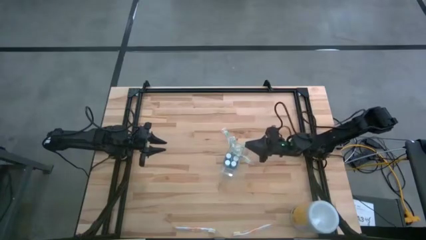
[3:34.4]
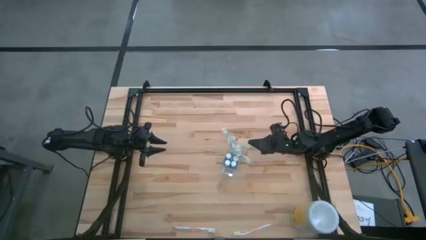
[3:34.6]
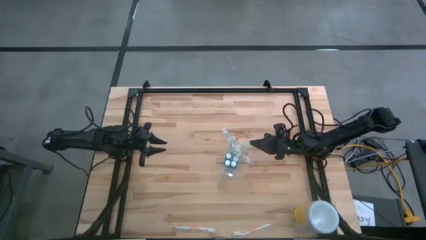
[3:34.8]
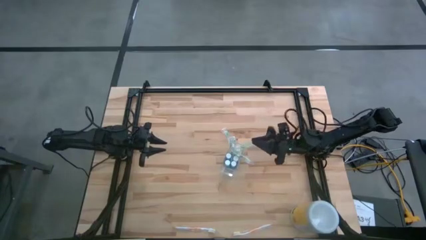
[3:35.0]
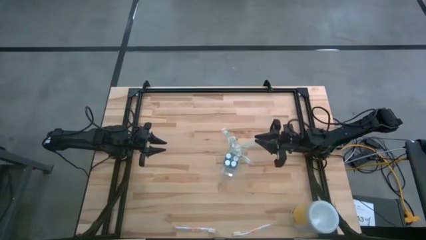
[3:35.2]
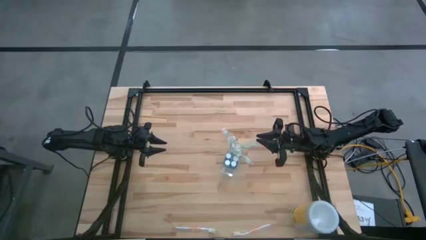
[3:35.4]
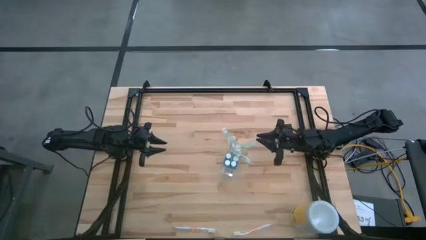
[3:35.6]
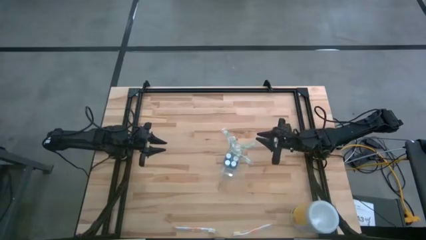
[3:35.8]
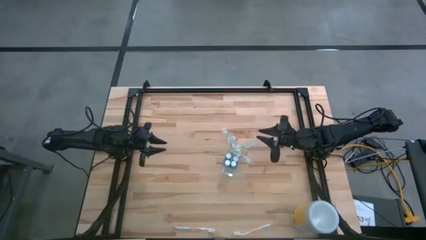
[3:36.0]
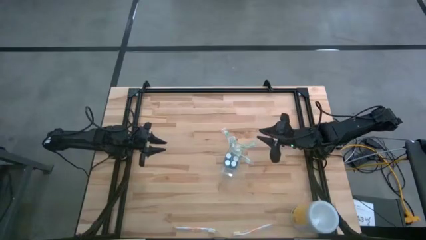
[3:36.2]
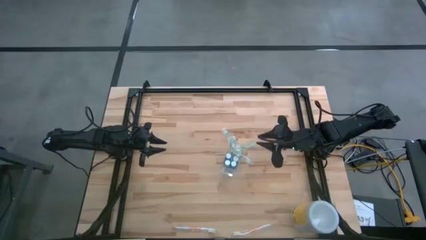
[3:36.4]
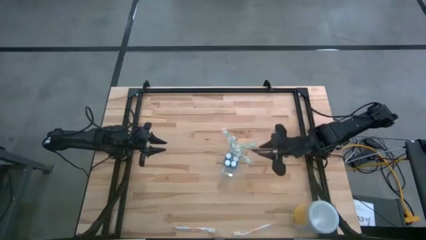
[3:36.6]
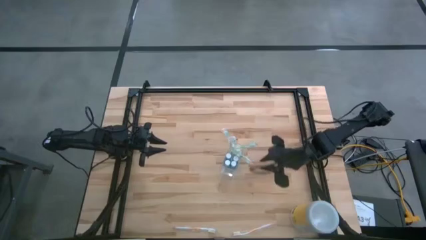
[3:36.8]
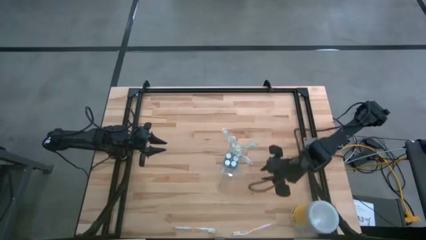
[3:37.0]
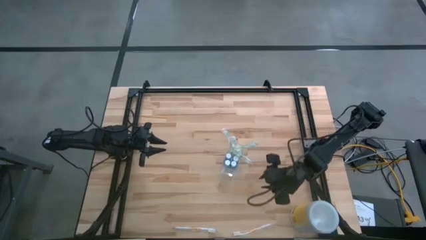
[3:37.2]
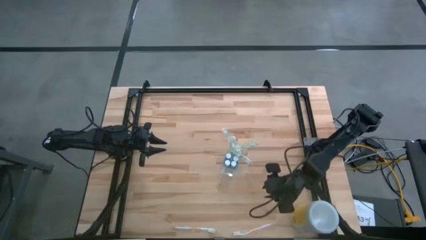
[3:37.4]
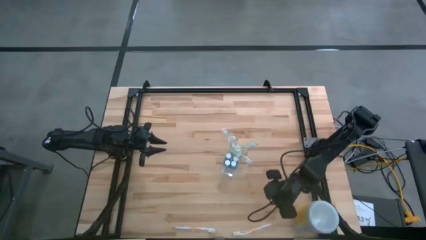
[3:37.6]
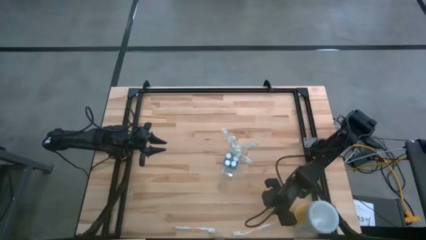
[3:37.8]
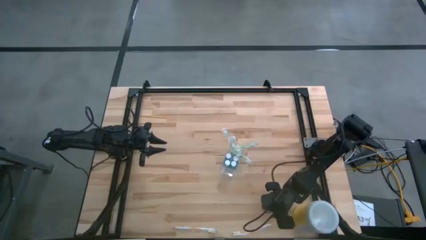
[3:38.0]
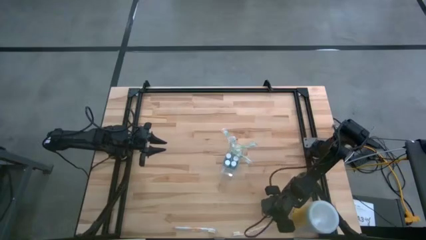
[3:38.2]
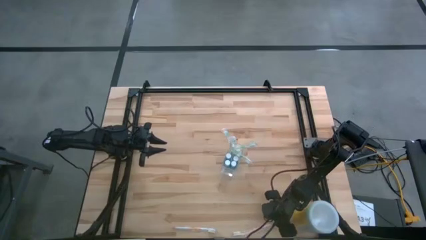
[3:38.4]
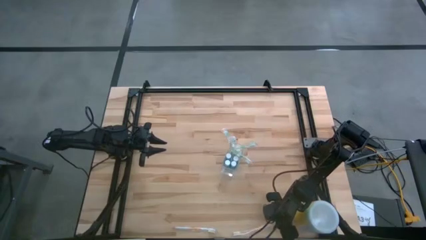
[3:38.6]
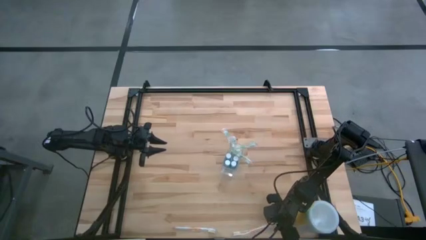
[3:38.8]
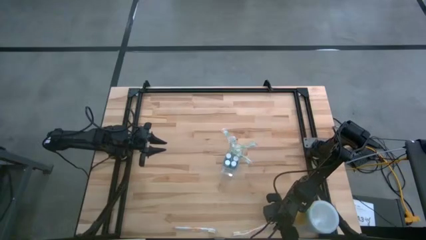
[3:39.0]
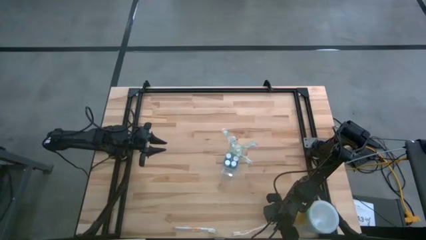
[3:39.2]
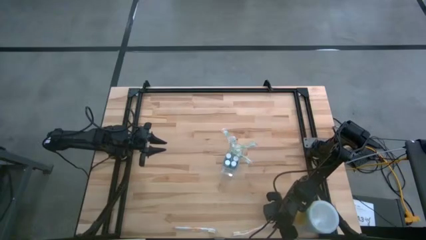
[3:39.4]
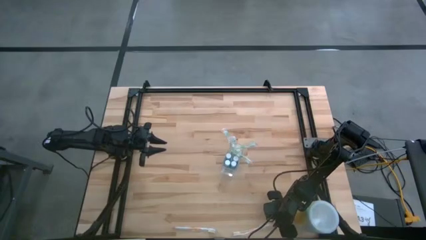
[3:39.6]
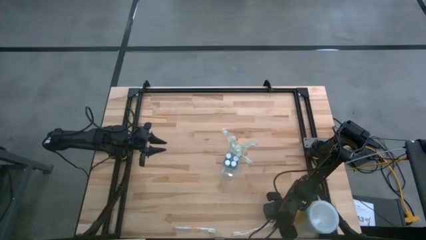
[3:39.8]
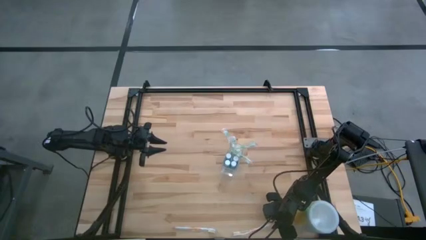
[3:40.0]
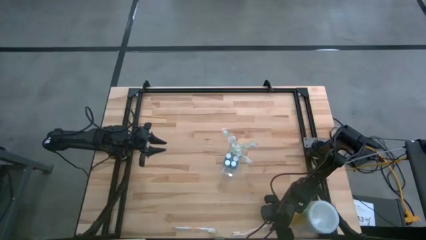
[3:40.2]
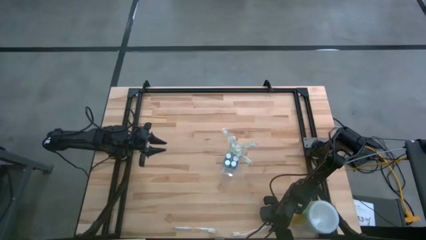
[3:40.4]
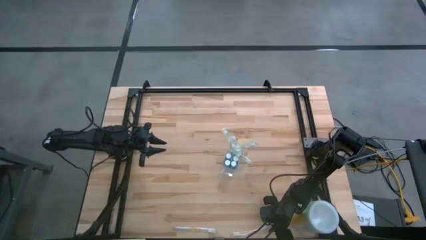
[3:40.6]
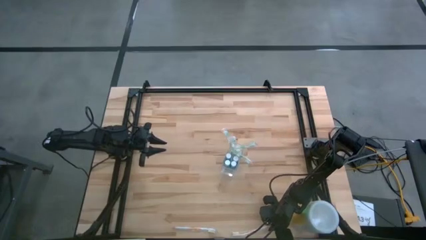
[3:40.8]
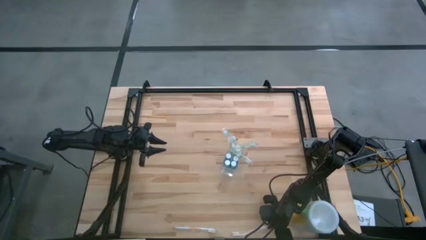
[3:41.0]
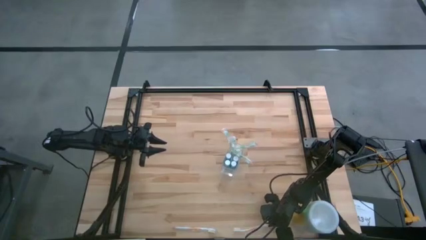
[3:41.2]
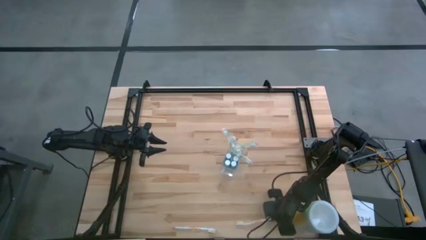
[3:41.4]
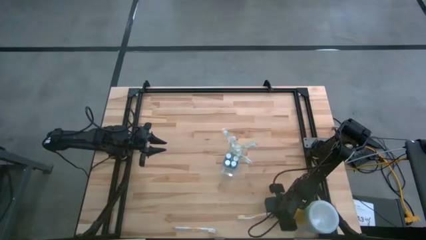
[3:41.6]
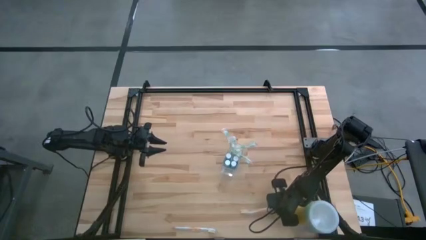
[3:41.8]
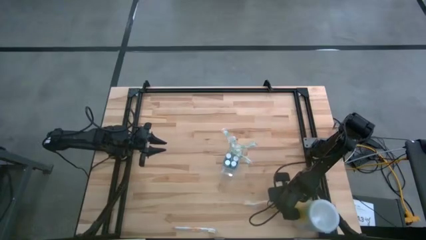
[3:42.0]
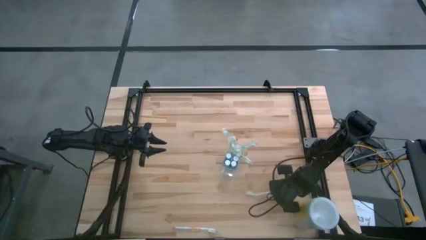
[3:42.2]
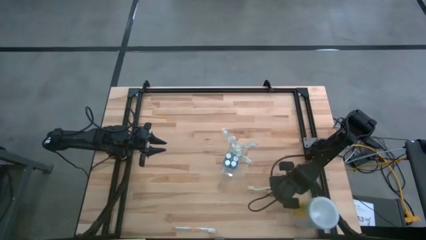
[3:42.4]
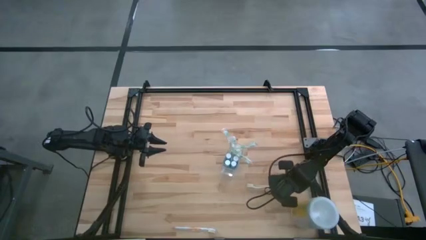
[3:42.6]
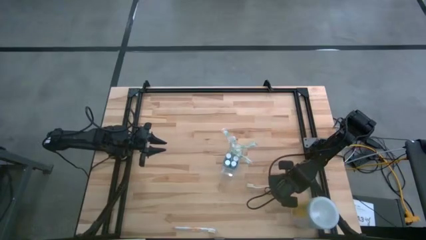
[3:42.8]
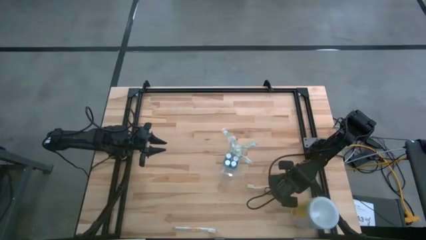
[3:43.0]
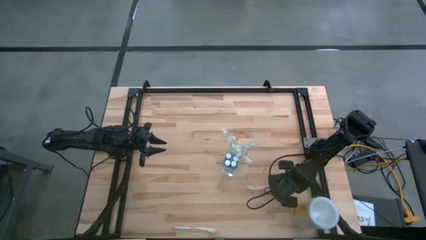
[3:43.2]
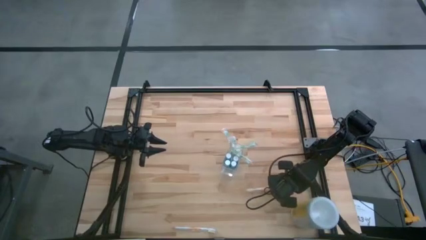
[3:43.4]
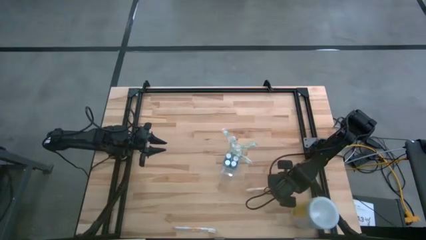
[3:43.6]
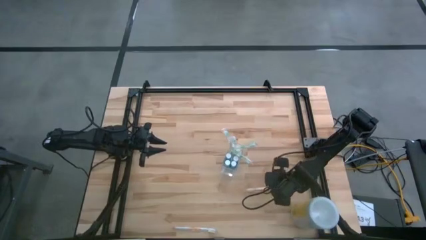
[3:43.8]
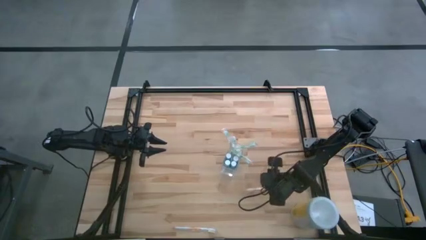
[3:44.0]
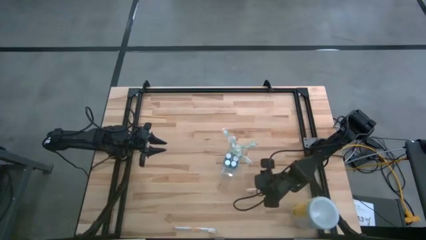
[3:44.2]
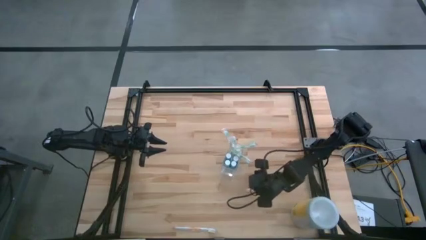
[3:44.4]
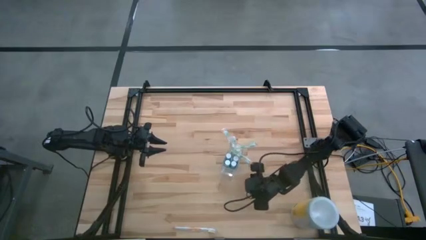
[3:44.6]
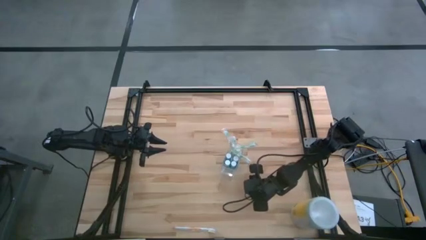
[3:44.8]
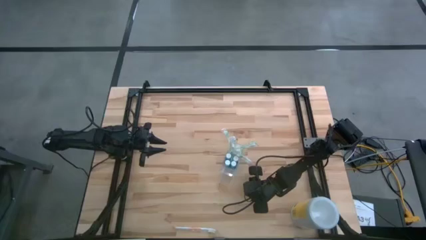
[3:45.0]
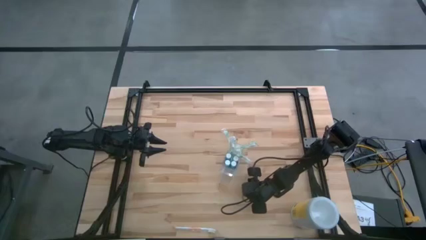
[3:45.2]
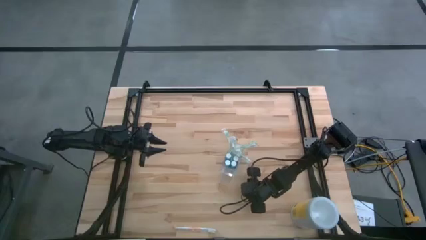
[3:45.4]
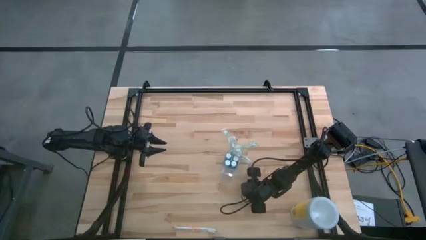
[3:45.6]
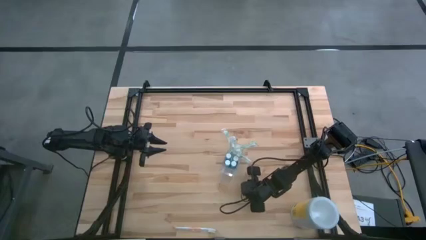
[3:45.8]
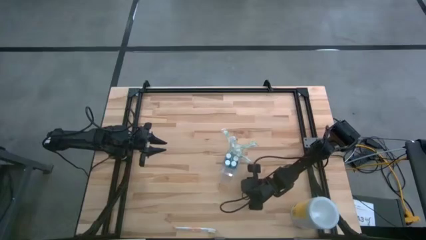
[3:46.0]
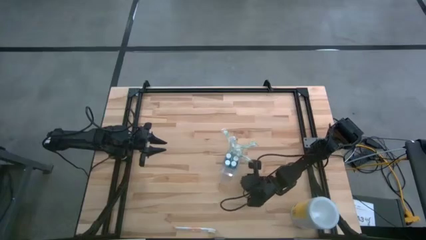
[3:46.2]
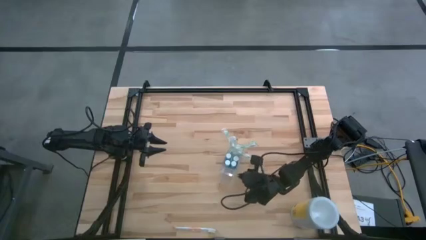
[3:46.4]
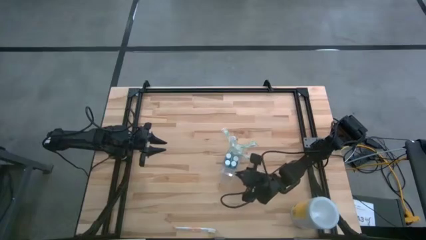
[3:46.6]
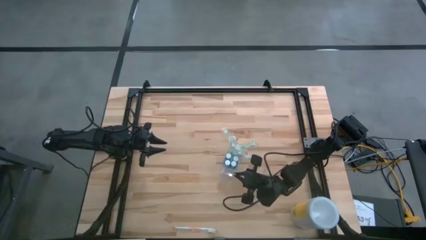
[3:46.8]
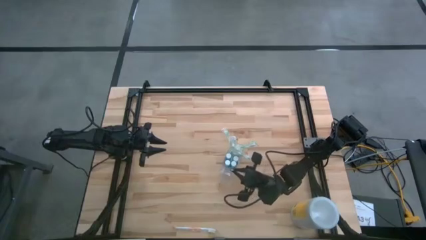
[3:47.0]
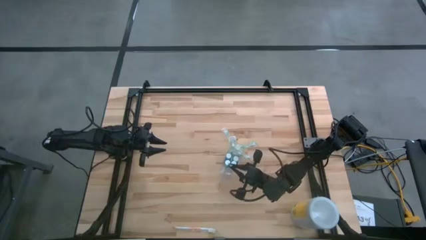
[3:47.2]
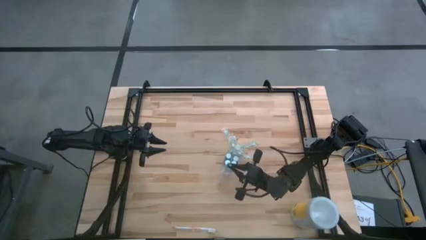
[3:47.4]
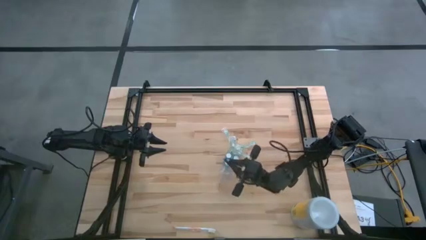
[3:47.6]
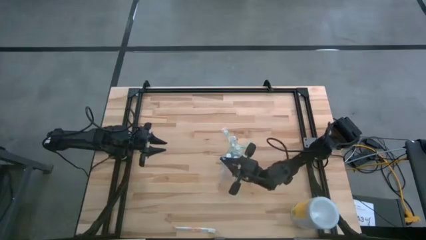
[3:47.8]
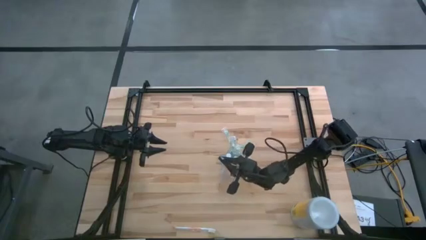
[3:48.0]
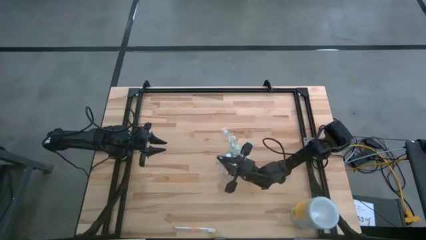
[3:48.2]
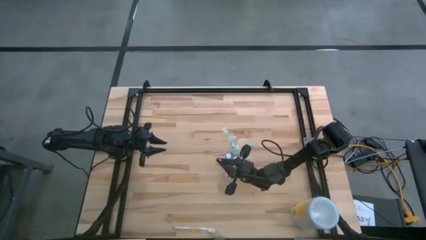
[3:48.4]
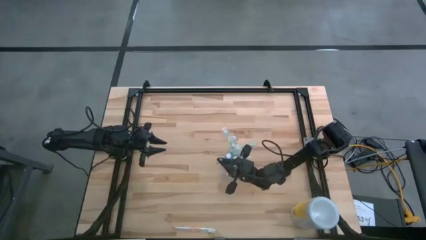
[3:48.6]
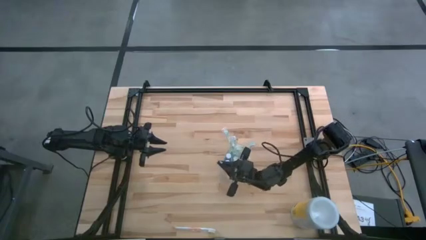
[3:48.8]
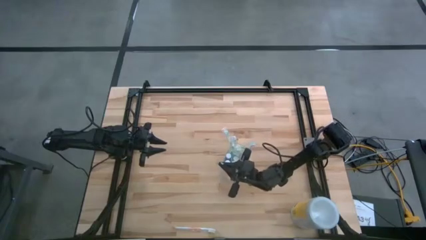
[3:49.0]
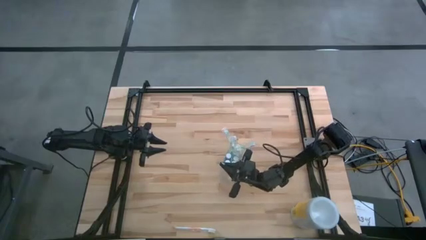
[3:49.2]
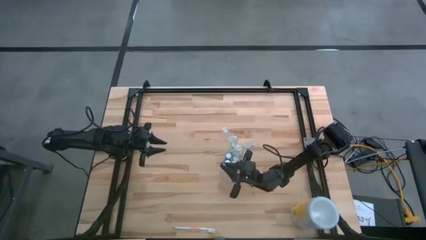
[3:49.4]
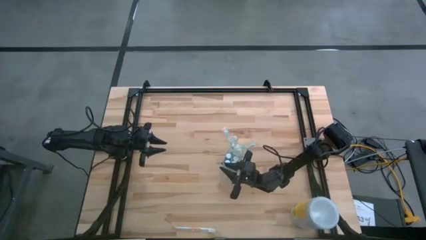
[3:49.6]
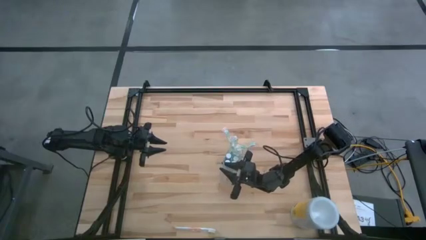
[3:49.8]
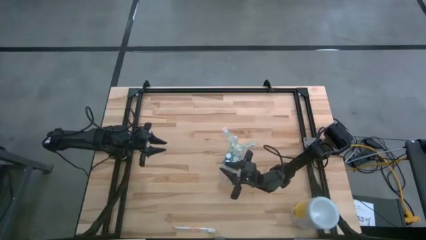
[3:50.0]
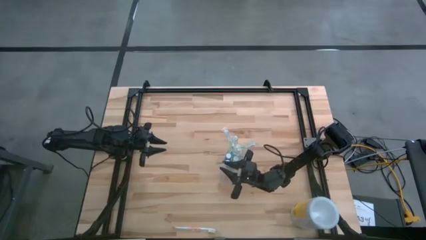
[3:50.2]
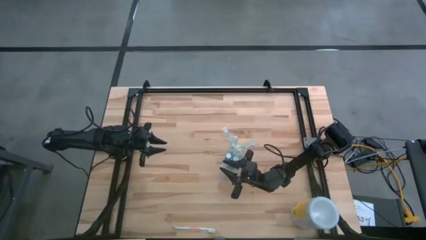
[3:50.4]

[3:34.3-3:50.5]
Task: Pick & Place toothbrushing station
Put the right white orange toothbrush into the front side of the transparent organizer
